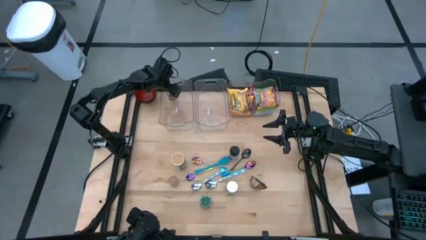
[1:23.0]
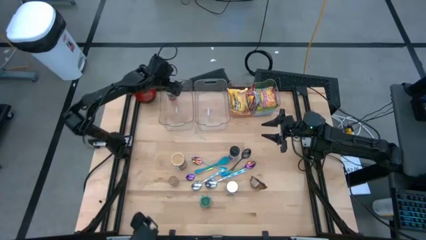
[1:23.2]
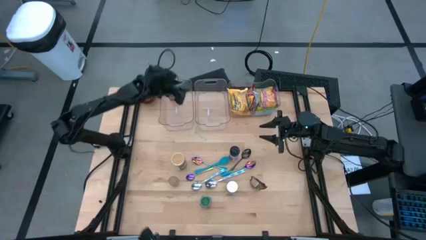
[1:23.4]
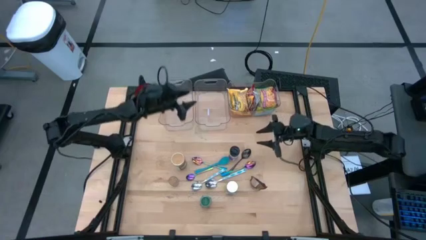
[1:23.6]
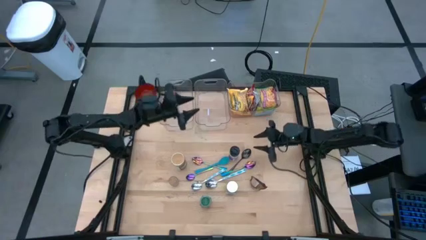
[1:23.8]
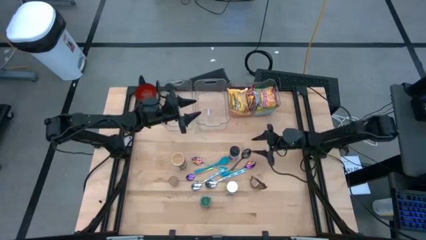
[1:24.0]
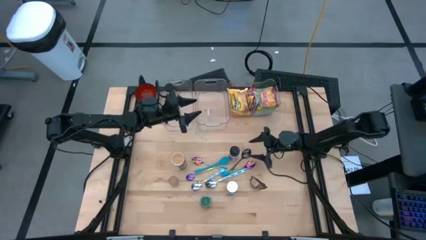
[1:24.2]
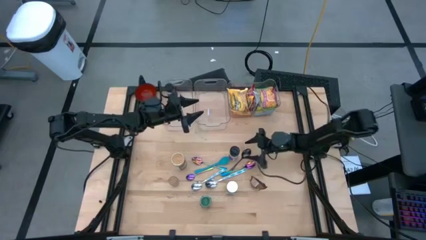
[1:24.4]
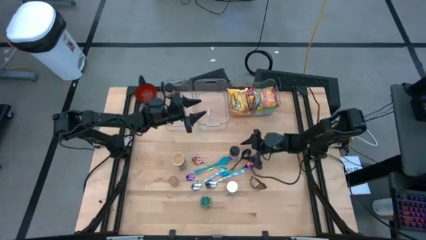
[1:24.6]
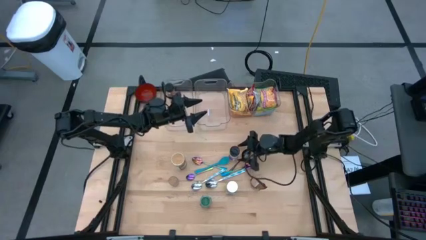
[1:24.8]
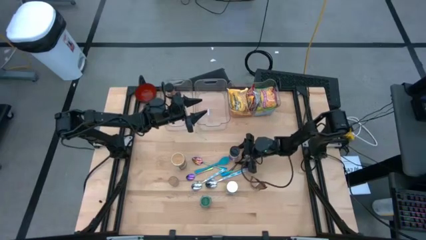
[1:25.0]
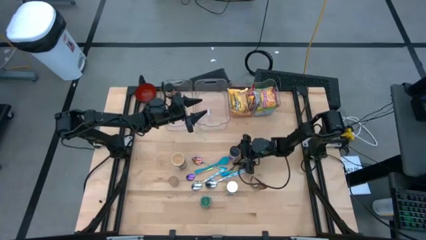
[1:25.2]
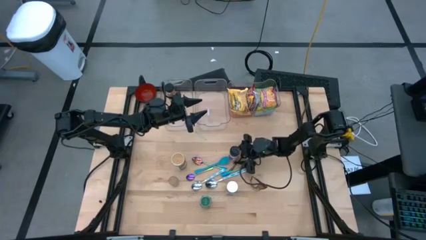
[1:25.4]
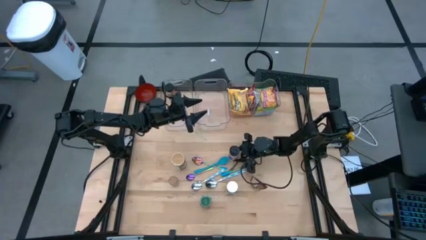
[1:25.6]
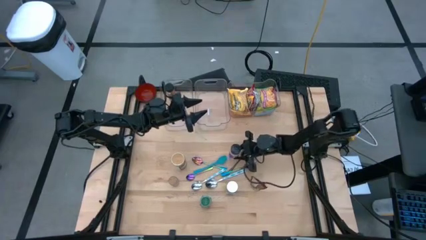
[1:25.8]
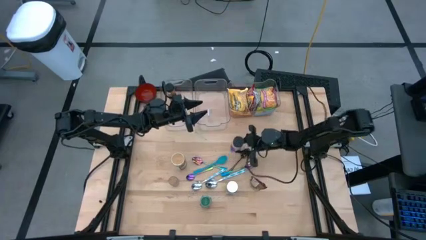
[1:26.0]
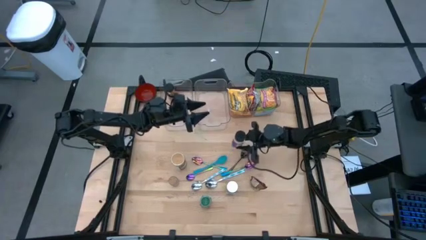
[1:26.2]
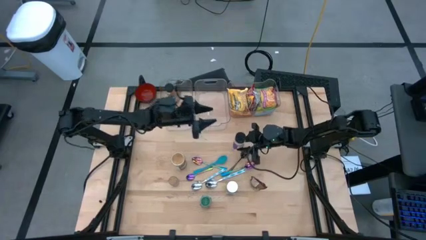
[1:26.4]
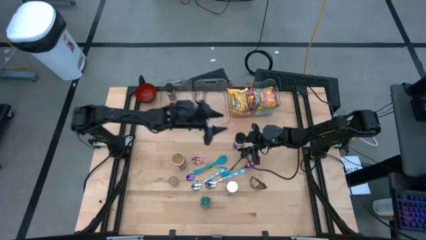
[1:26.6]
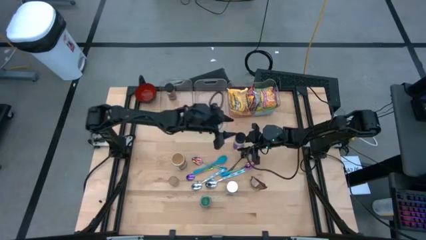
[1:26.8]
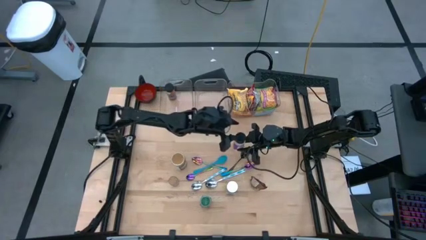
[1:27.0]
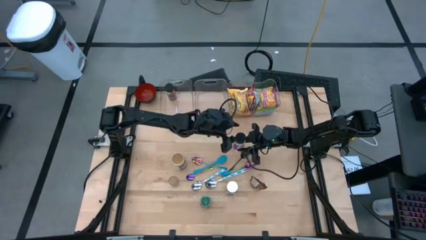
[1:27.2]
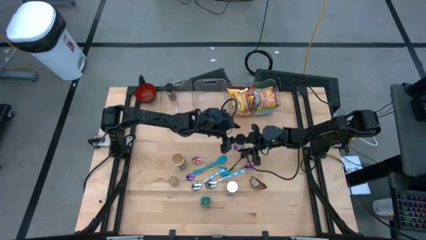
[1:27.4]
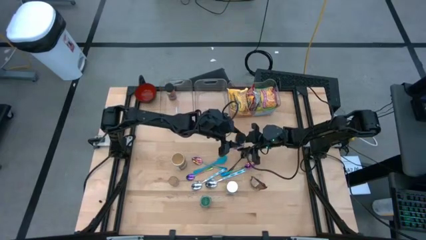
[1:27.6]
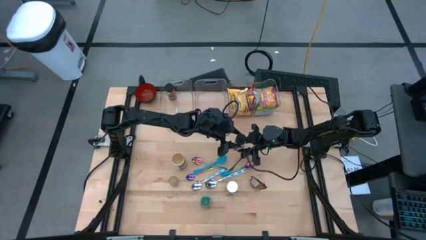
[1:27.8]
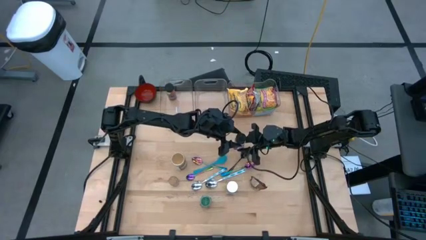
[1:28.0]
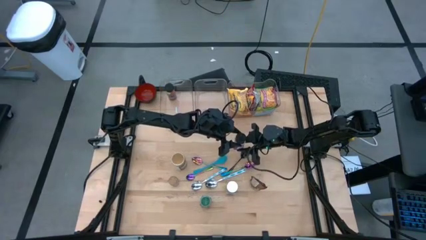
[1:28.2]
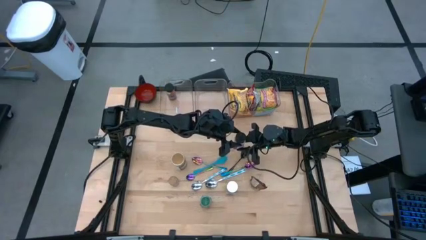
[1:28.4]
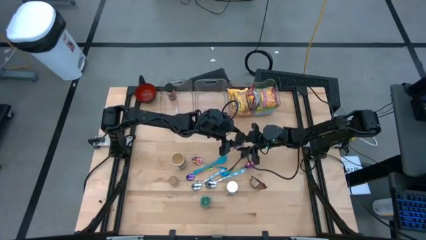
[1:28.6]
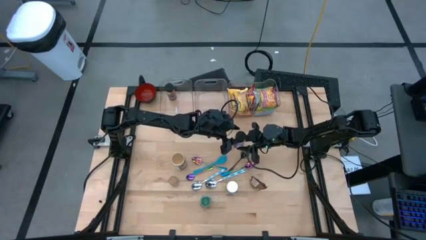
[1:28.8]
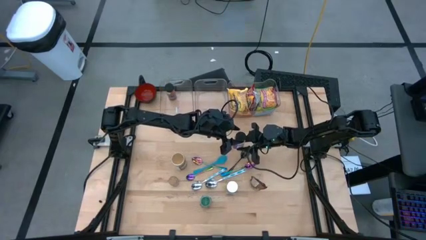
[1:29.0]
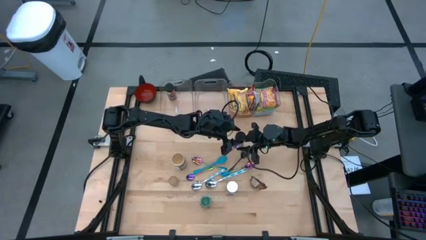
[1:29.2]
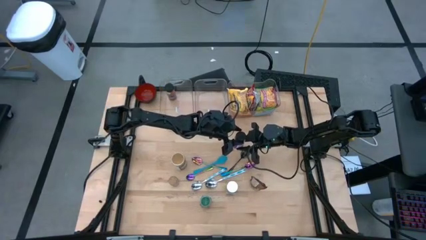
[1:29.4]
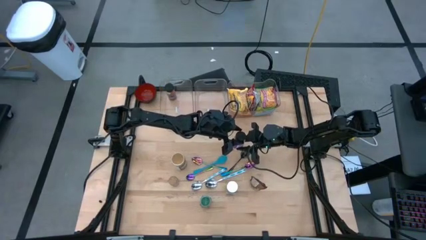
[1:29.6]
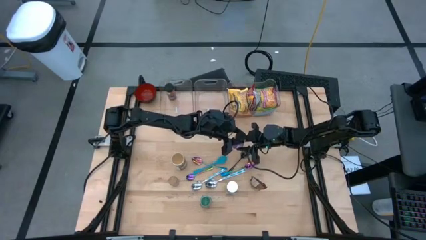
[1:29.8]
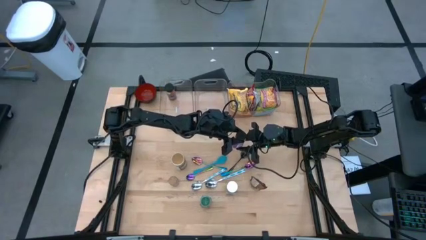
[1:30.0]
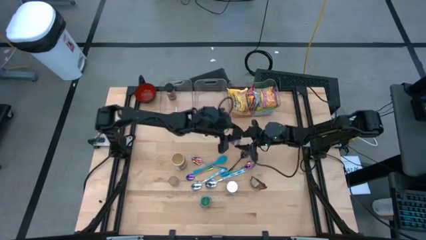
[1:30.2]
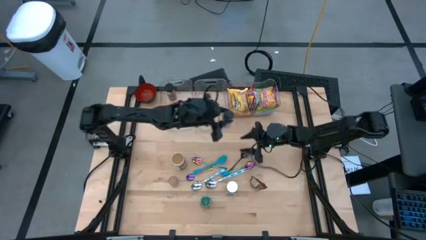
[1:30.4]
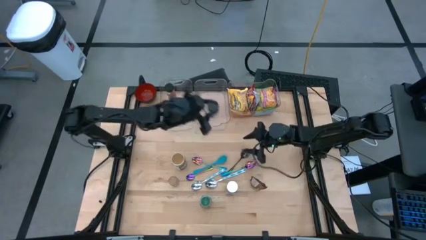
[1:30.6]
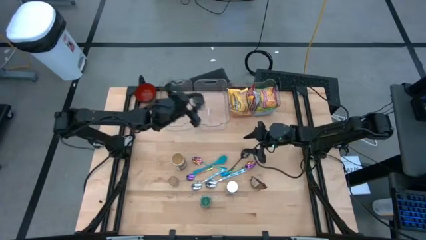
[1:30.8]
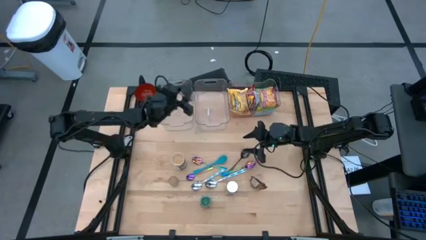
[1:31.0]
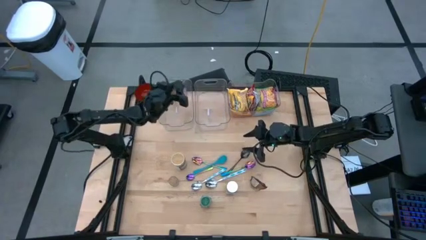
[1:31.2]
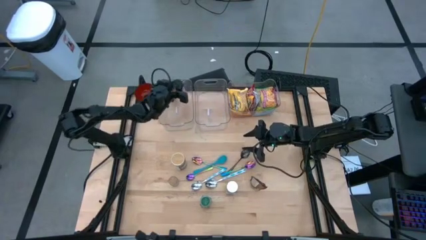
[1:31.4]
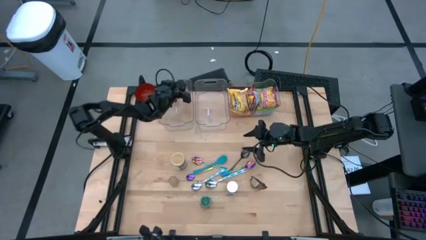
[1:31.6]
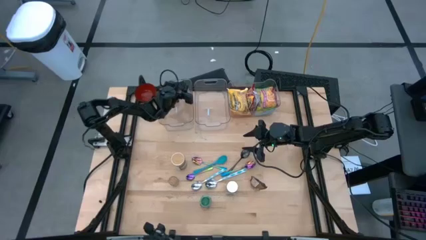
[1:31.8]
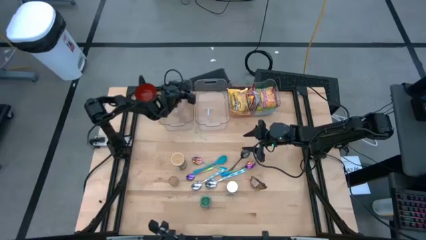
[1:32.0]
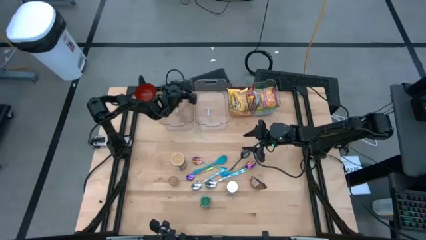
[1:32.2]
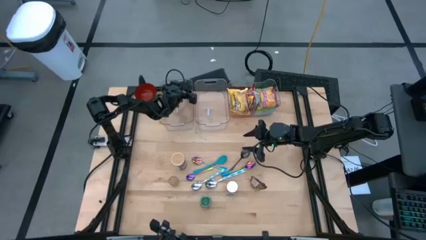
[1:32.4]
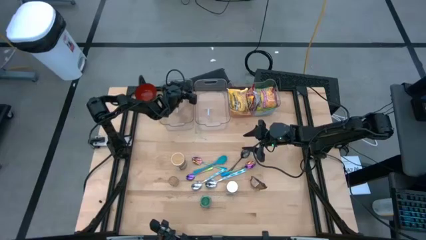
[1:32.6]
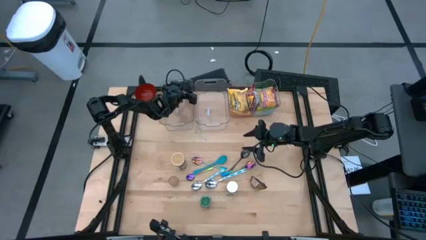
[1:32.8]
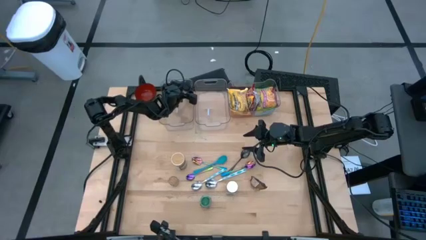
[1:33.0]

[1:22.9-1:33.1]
Task: Pick & Place Food Item
Put the violet seasoning bottle into the left transparent bin

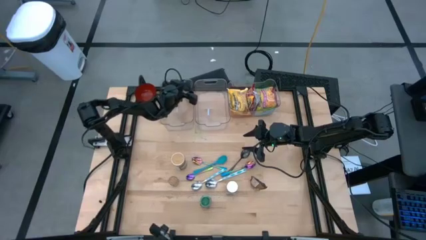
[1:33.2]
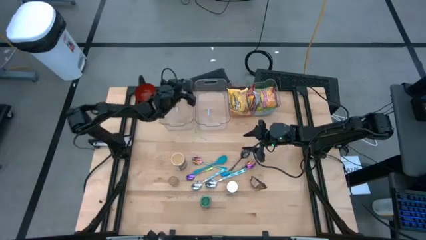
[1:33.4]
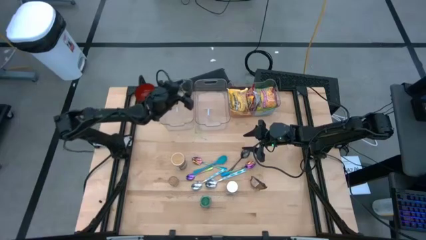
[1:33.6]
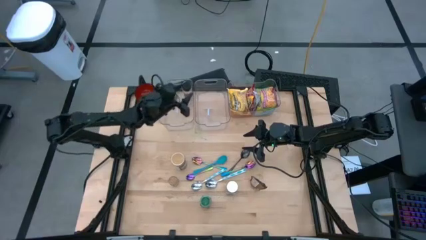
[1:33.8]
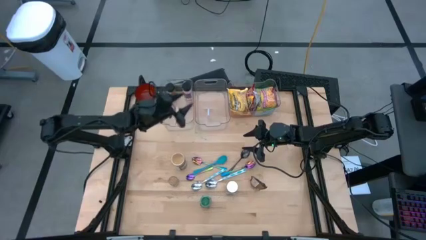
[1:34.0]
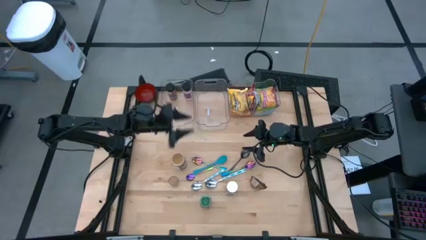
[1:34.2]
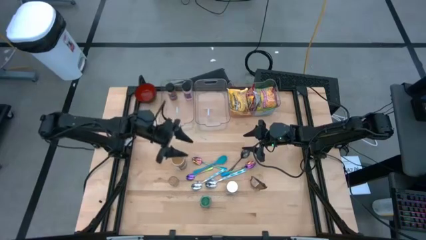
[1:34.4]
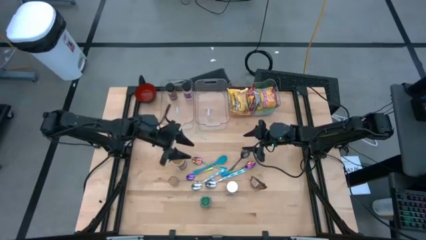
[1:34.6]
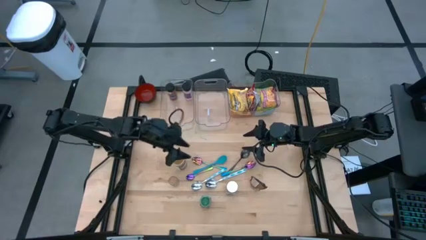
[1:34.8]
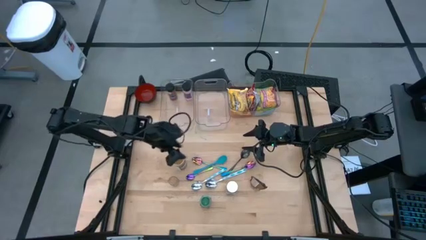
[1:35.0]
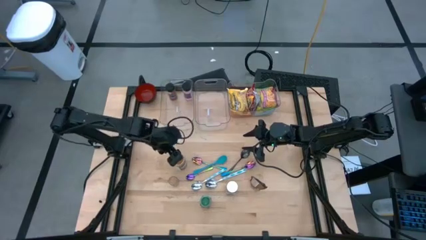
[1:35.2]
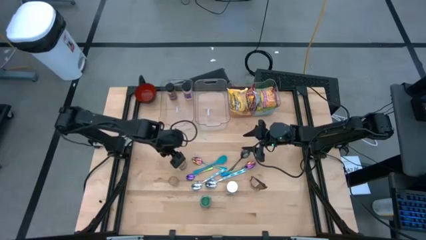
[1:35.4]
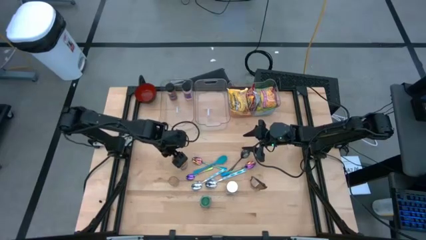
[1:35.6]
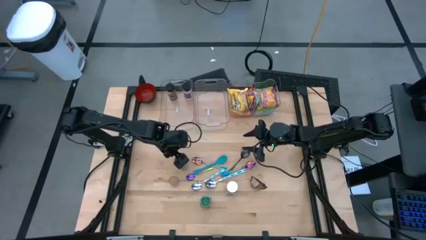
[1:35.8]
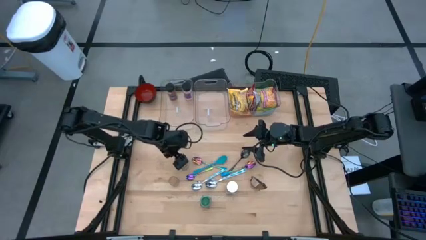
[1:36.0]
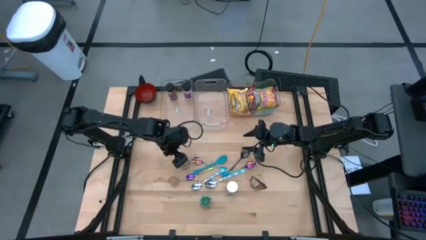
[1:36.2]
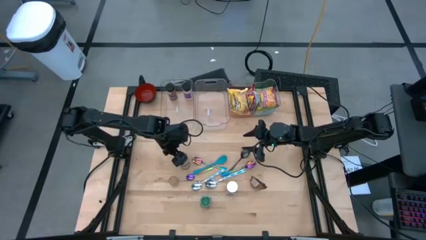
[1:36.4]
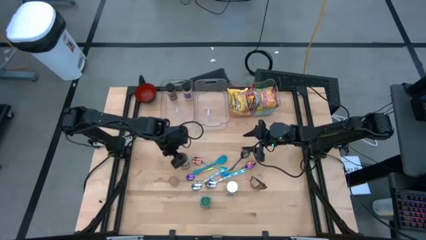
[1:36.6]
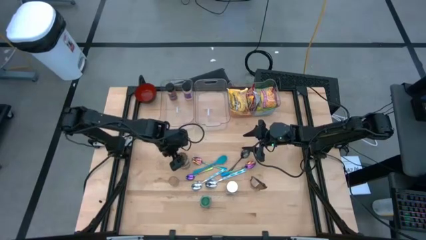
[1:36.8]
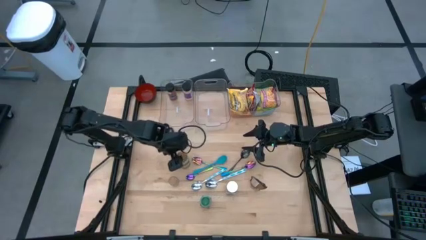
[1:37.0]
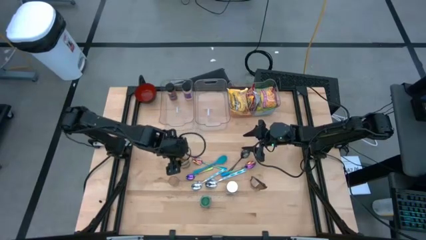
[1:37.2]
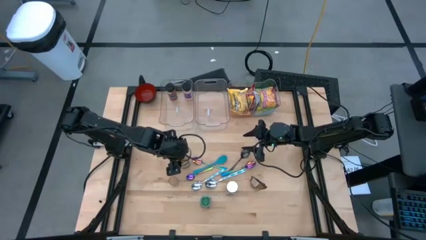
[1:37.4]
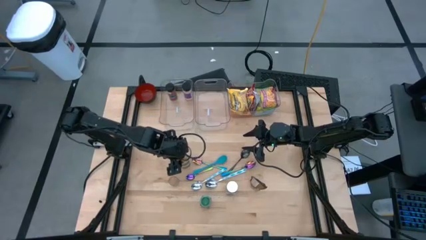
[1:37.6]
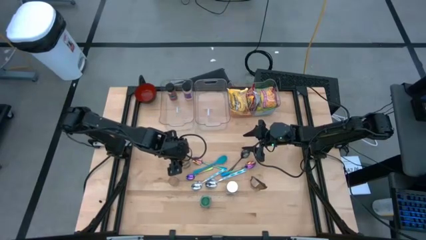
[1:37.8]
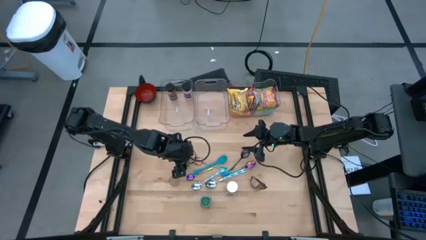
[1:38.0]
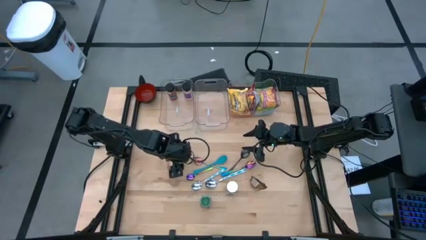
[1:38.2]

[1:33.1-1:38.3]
Put the gold seasoning bottle into the left transparent bin
